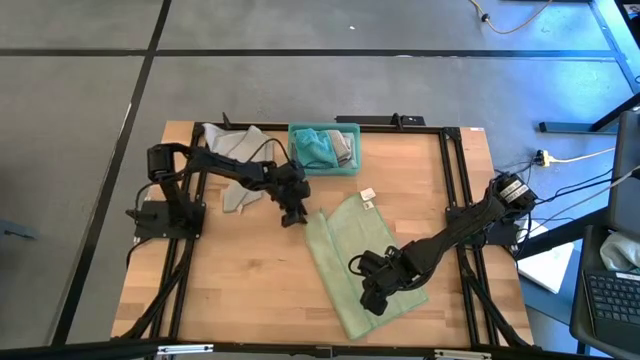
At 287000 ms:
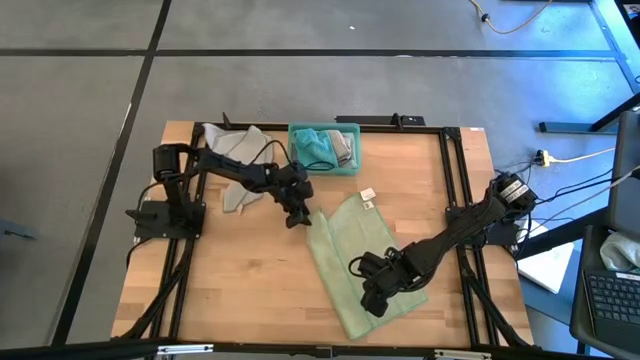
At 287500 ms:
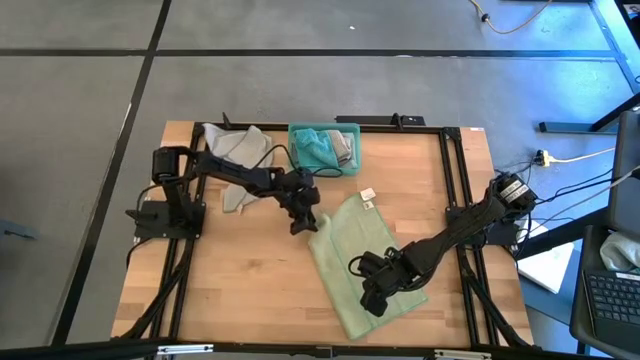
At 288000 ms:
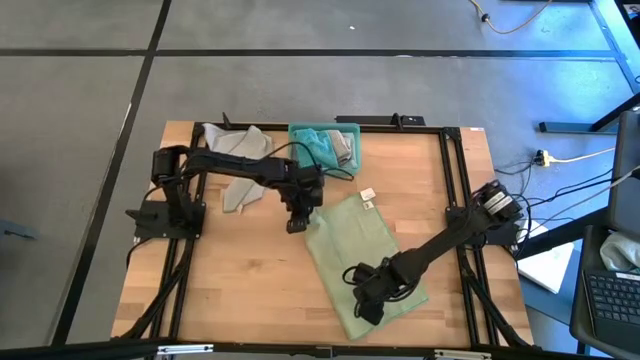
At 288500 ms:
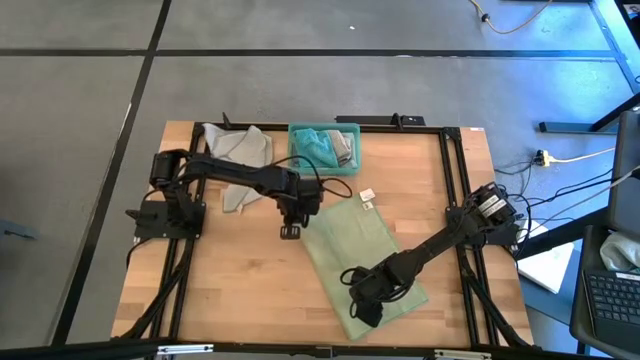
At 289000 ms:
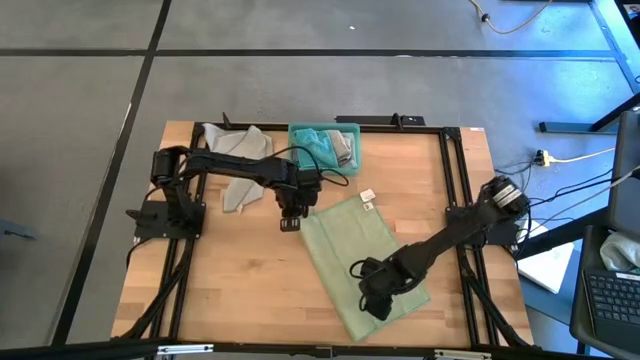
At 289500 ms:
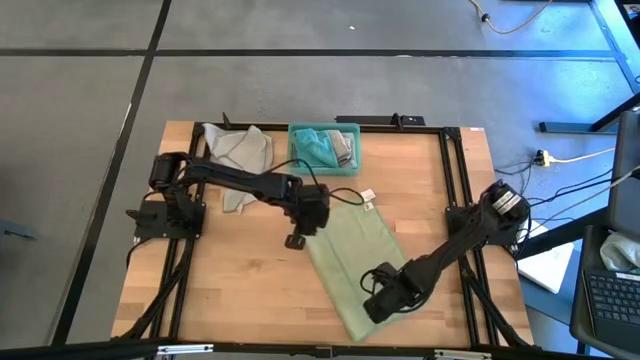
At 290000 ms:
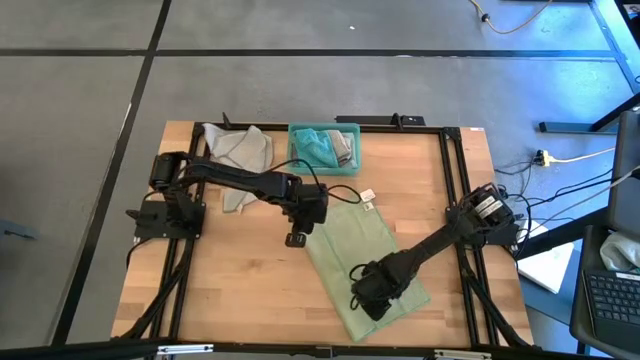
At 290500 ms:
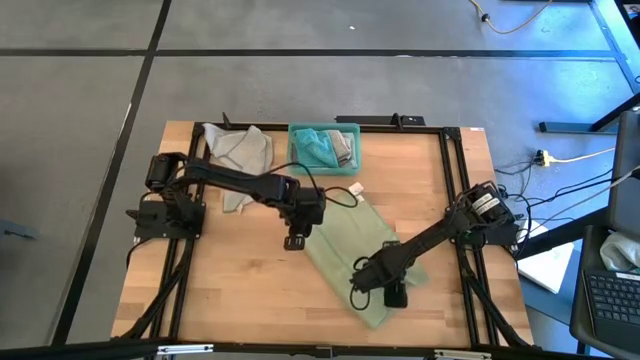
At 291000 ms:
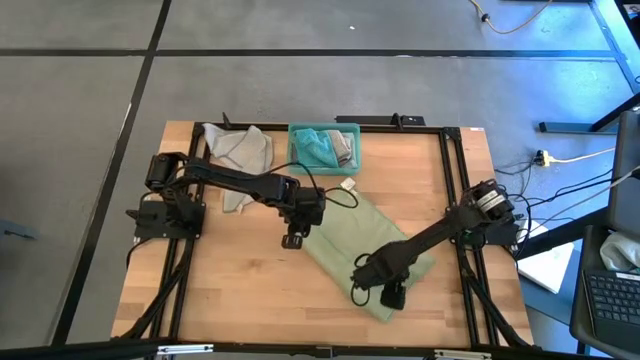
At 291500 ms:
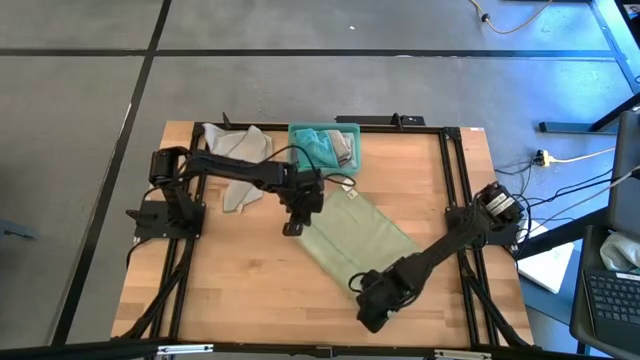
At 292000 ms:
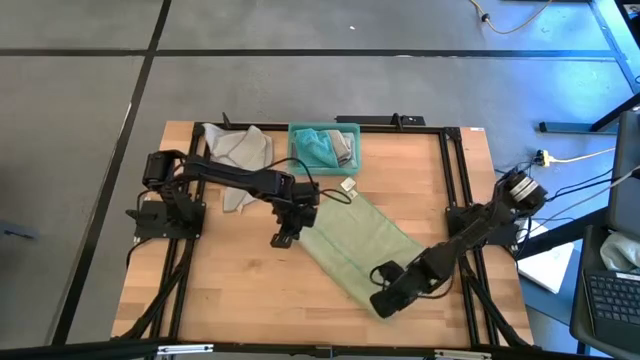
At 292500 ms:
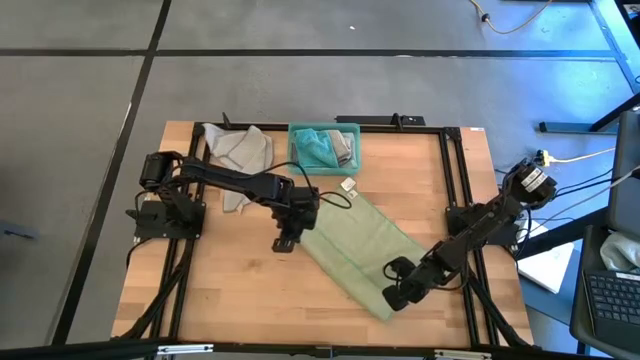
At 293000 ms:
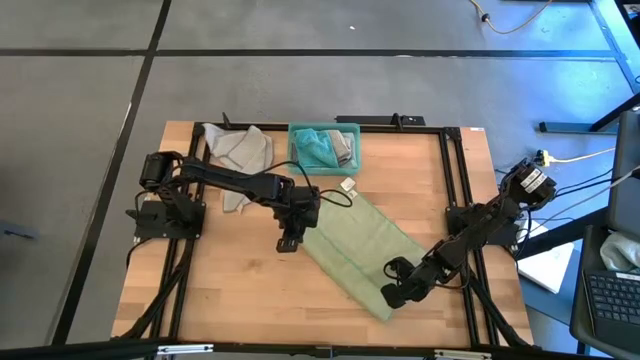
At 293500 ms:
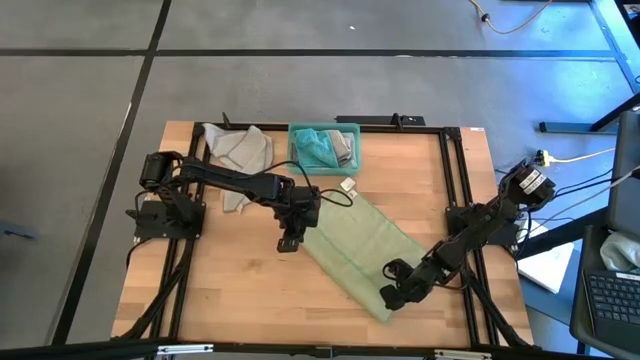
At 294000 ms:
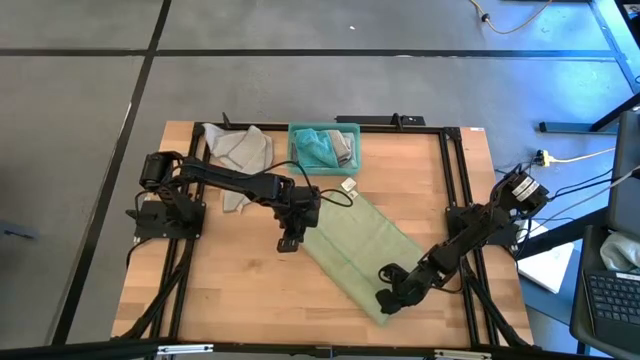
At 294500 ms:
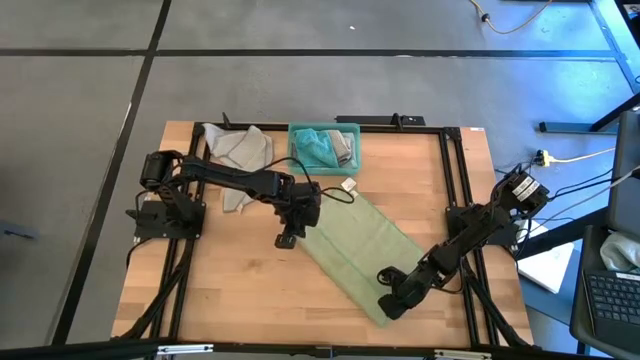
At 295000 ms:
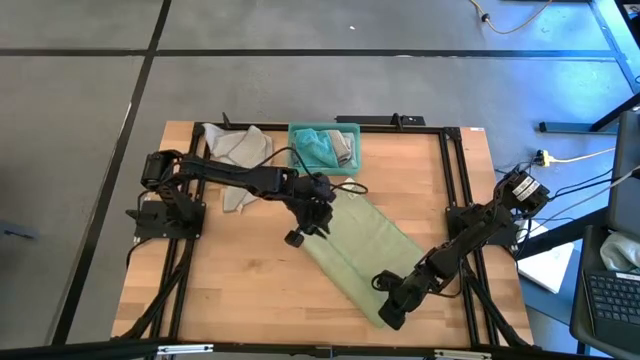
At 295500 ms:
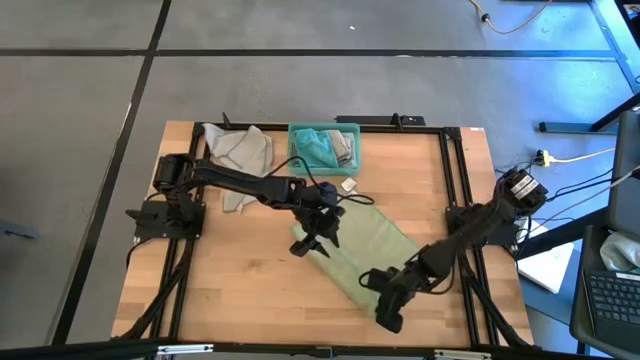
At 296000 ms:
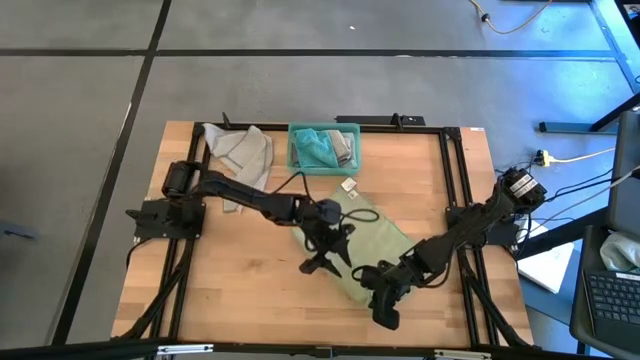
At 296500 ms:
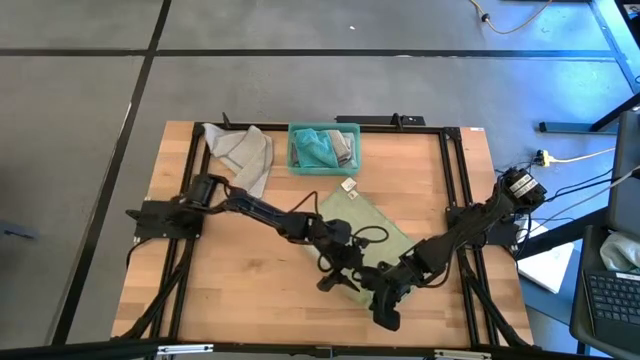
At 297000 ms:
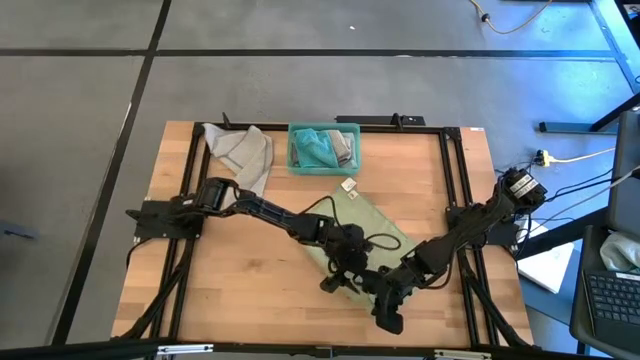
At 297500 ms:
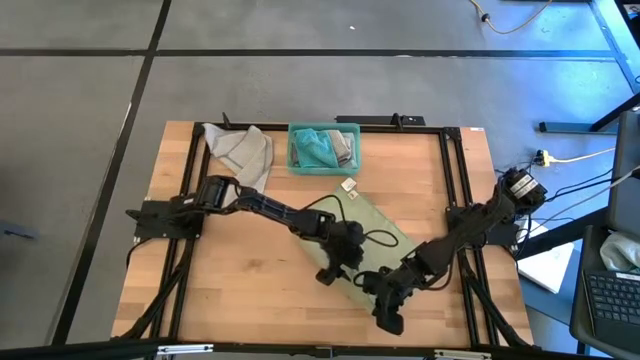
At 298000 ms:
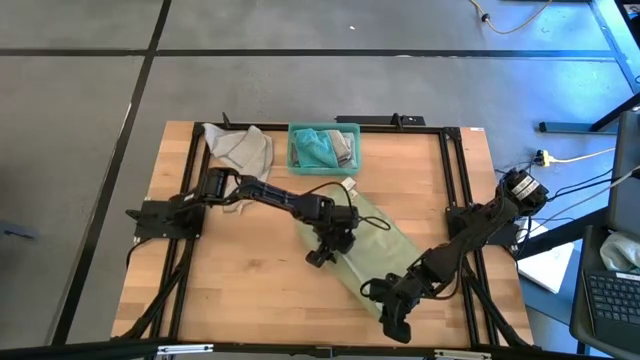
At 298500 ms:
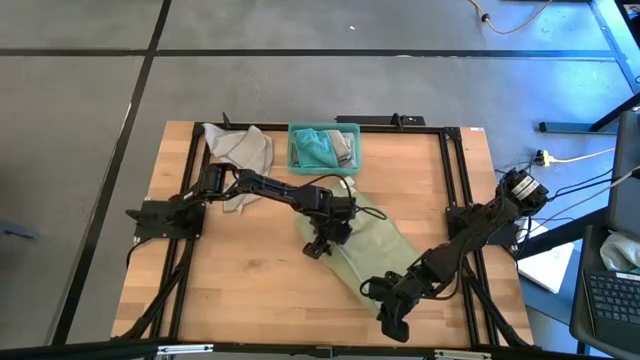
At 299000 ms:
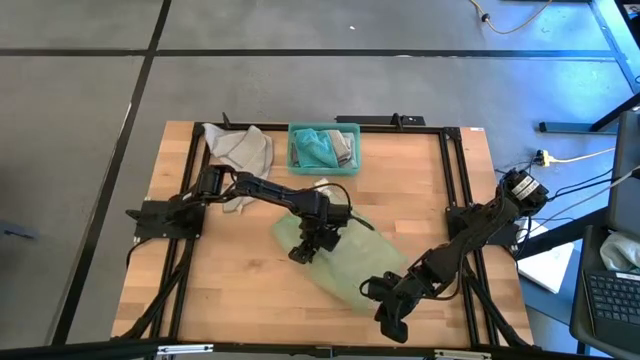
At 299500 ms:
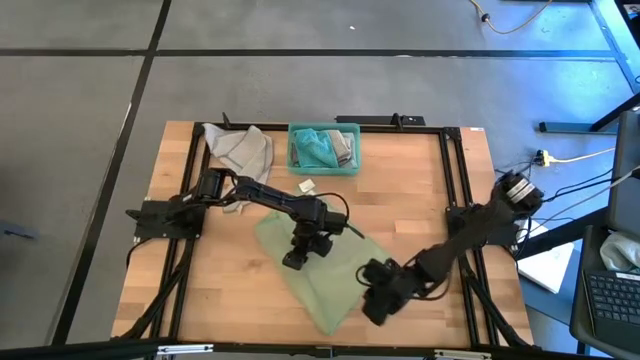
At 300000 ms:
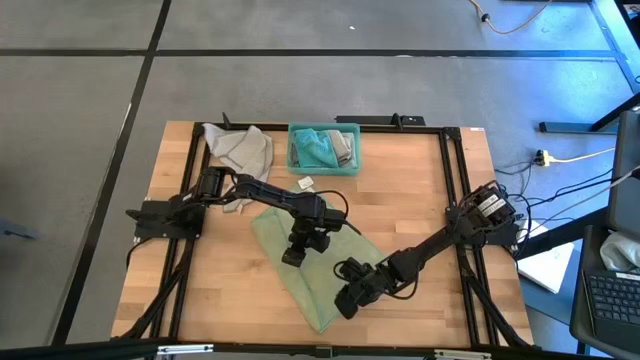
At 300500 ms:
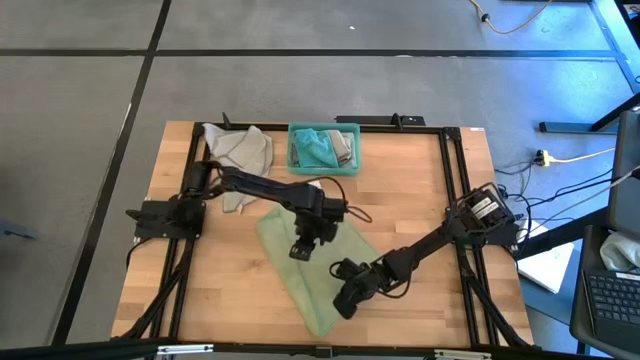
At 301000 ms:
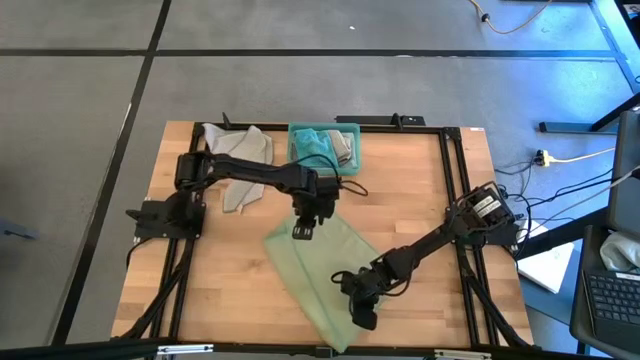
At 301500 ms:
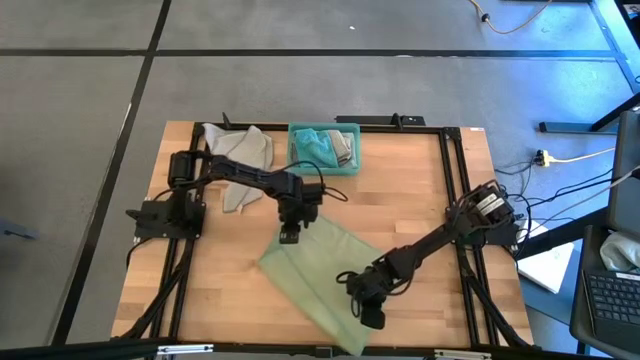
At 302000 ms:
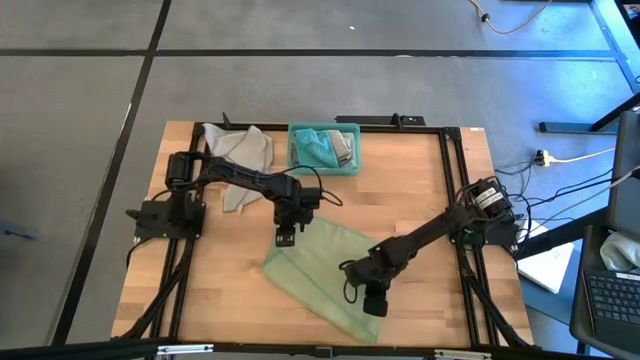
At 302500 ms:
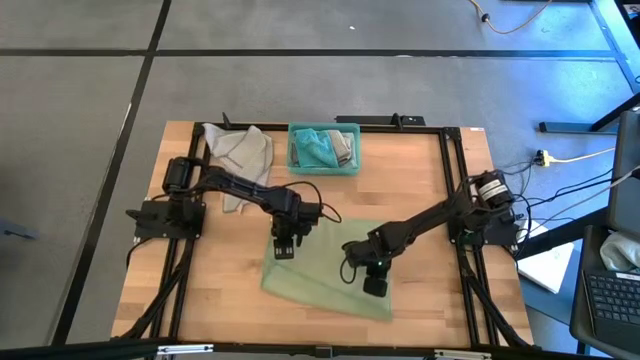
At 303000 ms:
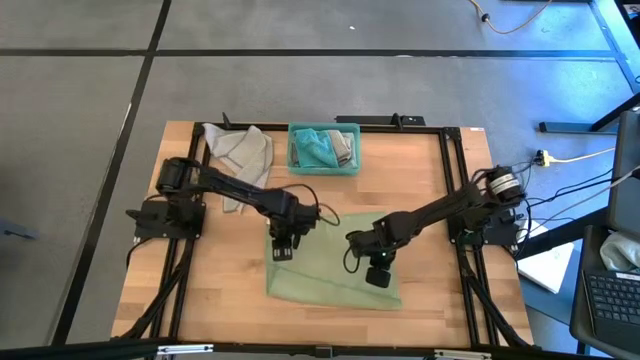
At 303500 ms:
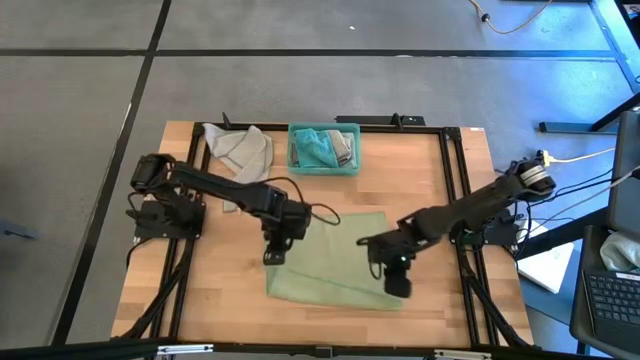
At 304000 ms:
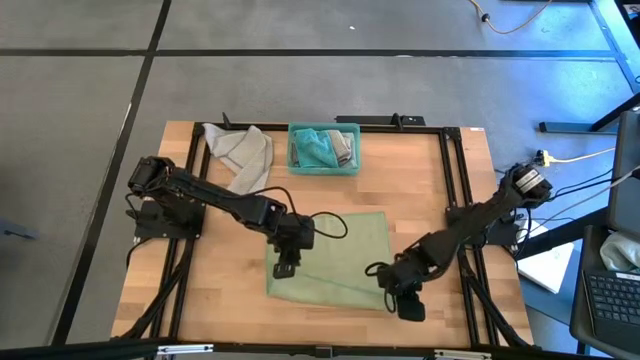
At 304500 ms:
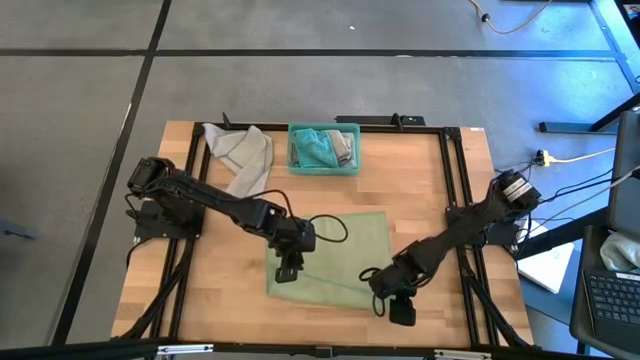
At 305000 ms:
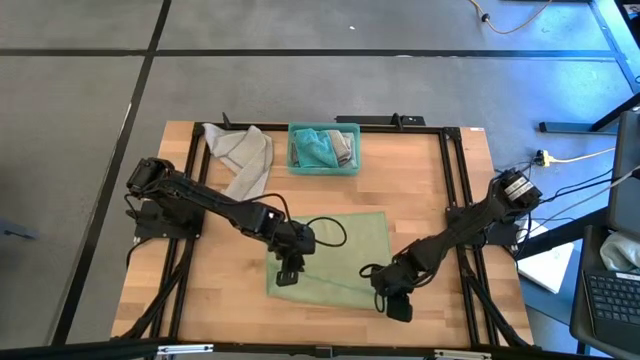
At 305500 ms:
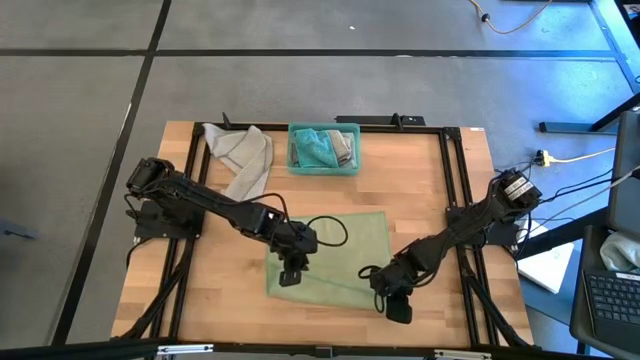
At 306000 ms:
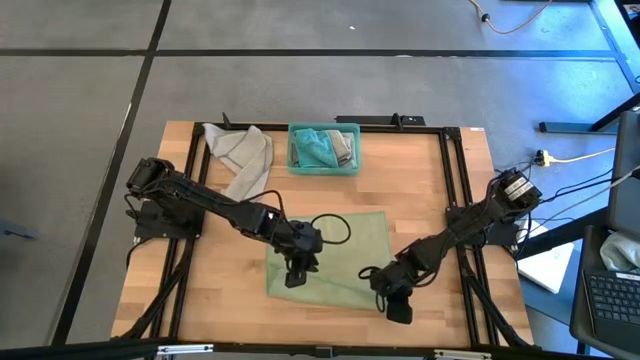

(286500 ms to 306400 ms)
Task: Fold microfiber towels
Fold the green towel
